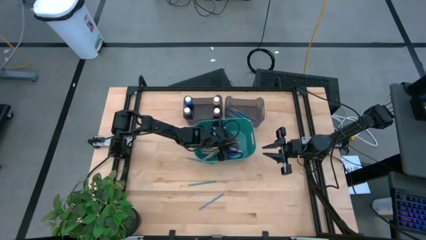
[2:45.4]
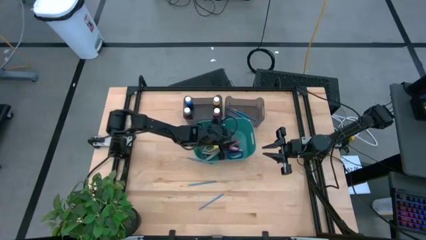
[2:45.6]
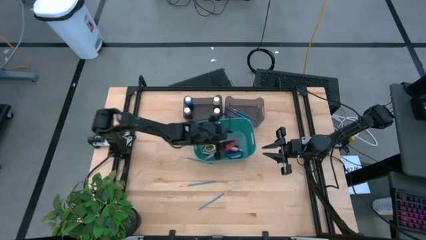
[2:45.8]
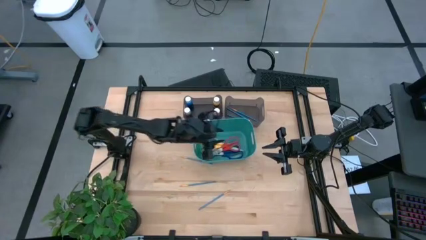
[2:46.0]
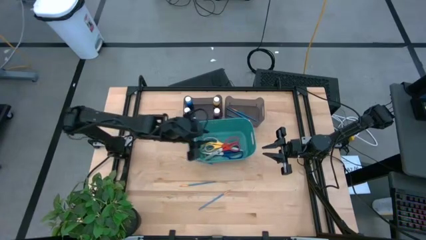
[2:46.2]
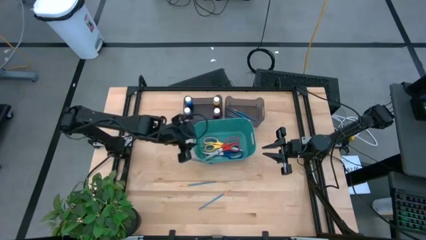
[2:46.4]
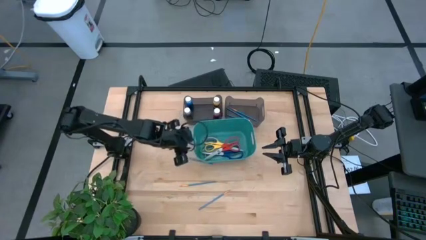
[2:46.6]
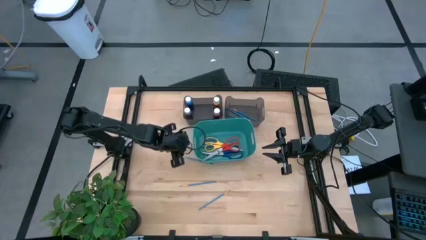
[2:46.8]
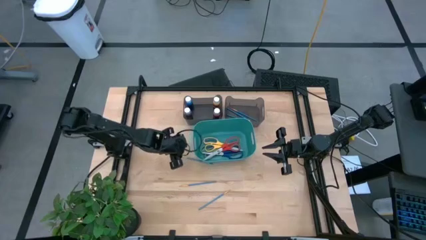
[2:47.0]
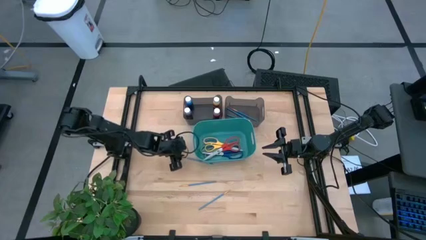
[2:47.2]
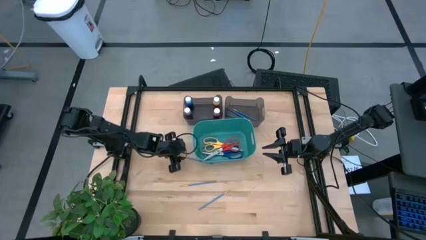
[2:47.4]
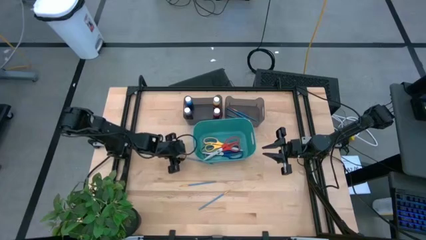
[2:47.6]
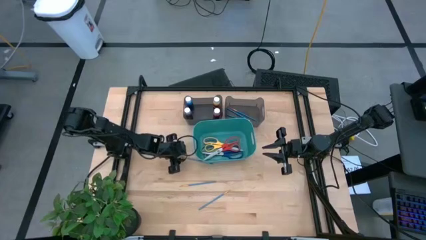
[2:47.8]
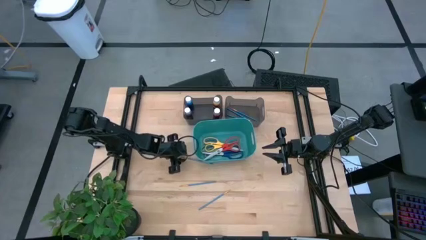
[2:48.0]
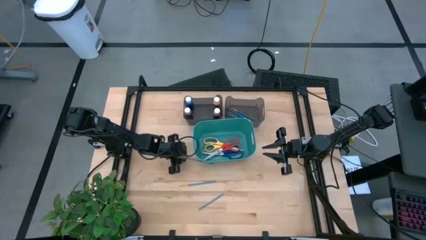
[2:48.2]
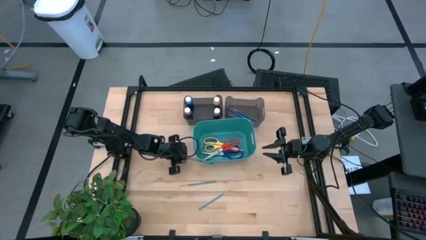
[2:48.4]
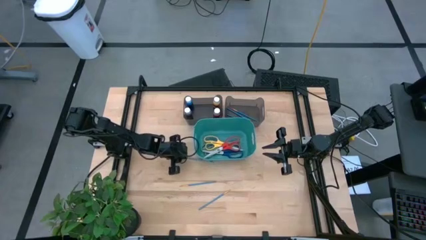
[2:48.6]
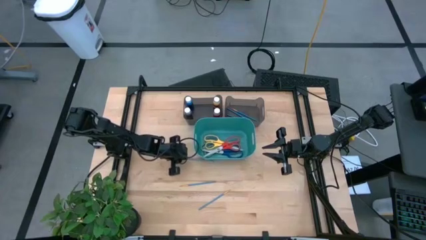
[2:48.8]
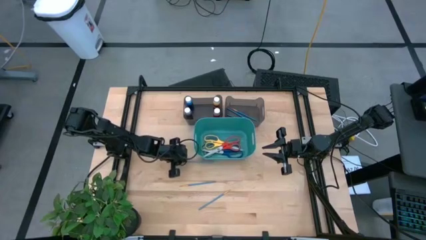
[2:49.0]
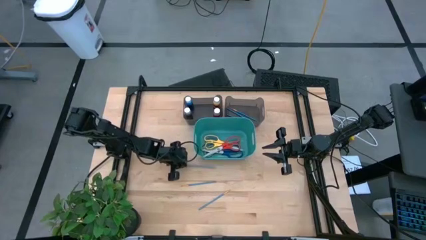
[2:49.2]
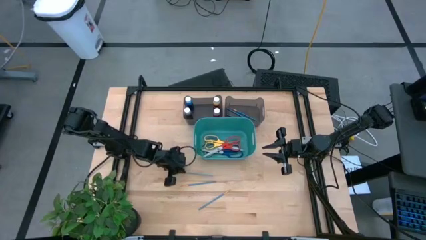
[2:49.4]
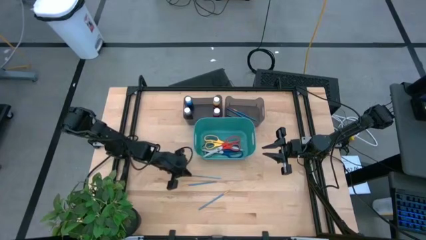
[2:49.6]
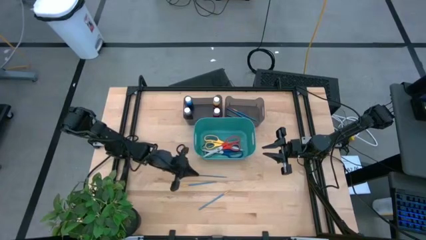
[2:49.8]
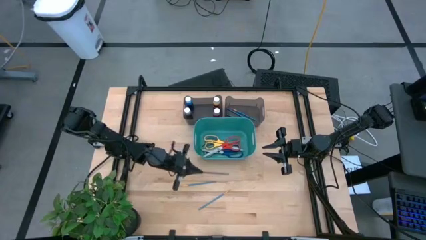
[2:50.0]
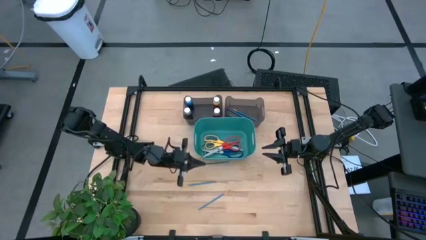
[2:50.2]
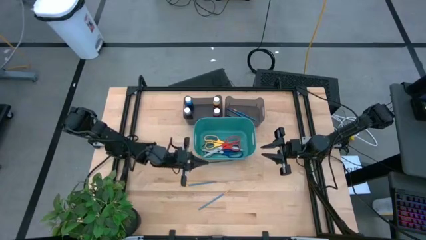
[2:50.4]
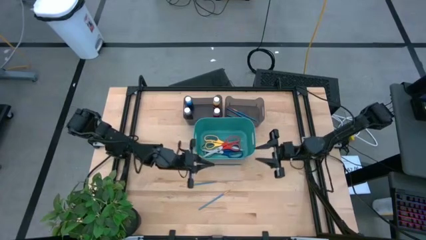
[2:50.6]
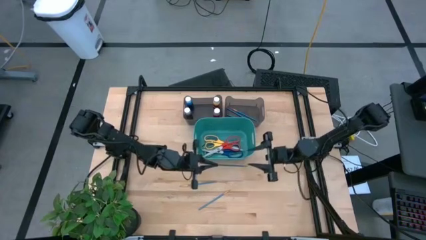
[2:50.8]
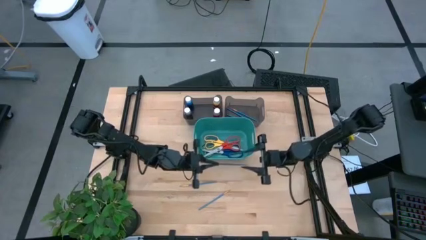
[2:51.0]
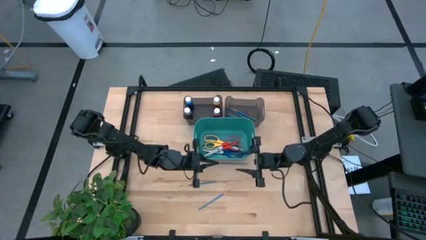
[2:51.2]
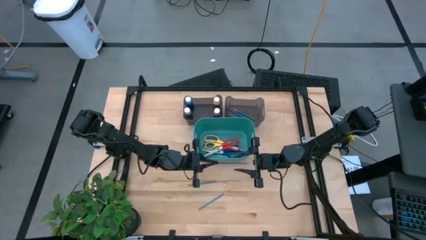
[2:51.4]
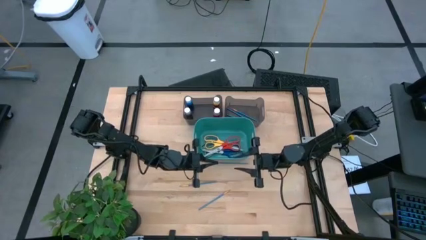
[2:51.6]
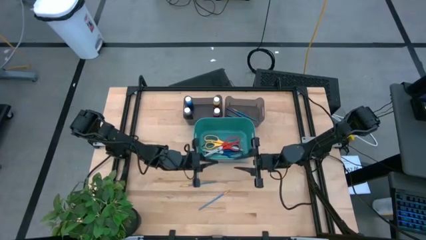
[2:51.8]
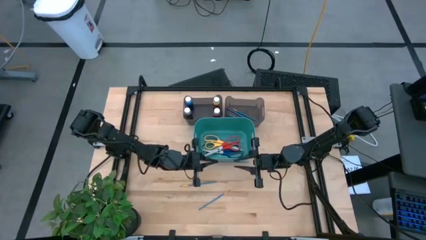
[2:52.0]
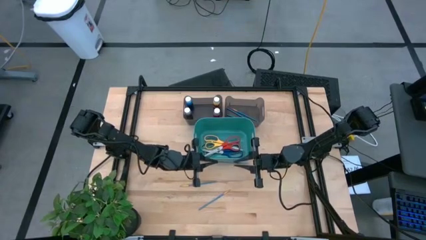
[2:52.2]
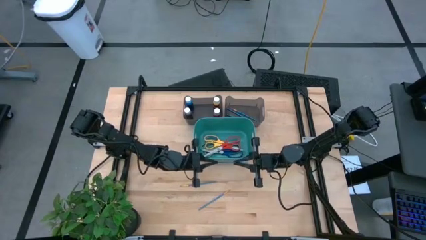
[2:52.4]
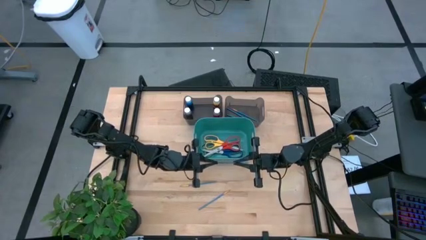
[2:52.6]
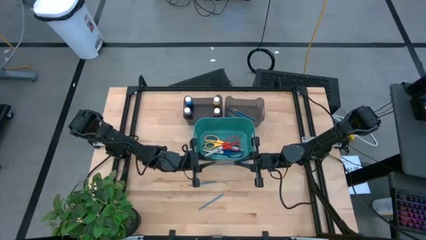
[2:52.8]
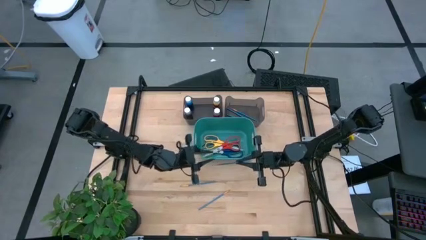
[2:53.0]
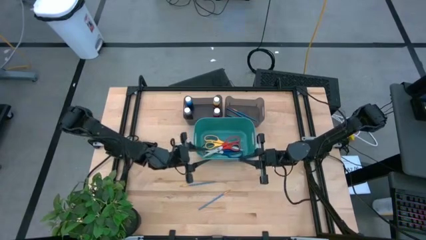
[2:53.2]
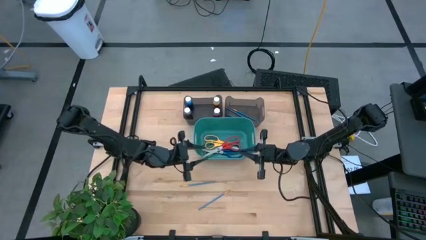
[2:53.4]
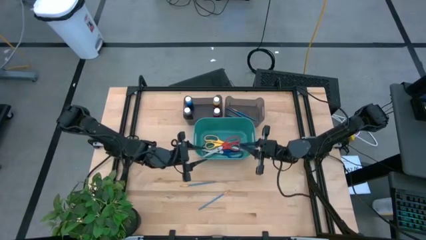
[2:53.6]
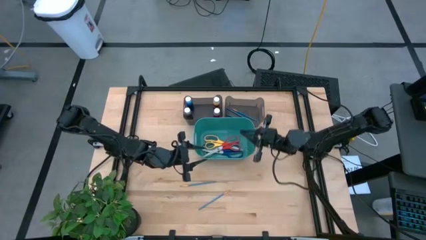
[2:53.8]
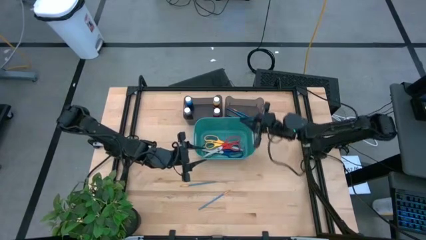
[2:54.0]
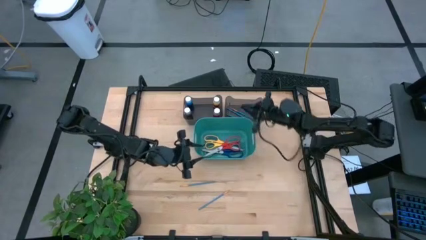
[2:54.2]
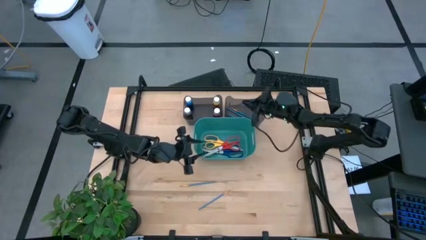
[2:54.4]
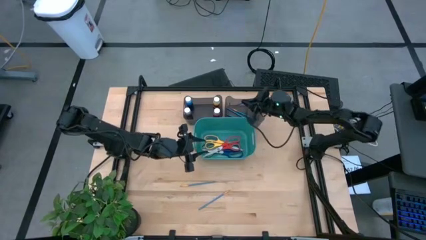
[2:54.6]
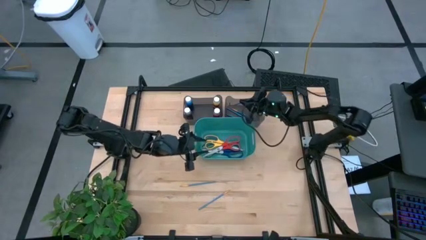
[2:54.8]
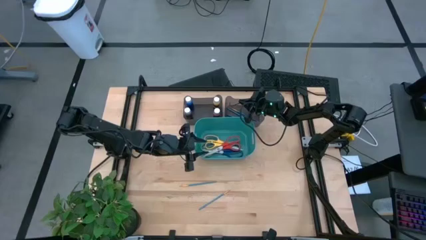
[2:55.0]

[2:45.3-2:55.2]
Task: Pick & Place Paint Supplies
Put the blue paint brush into the right black bin

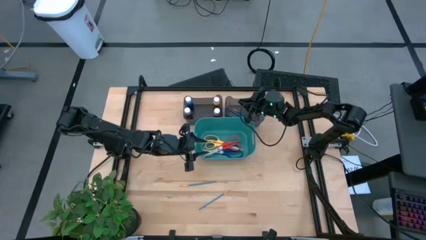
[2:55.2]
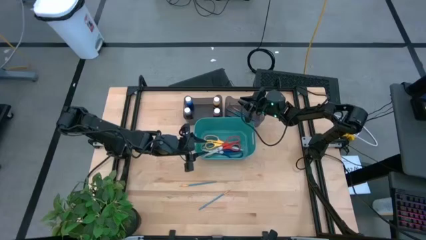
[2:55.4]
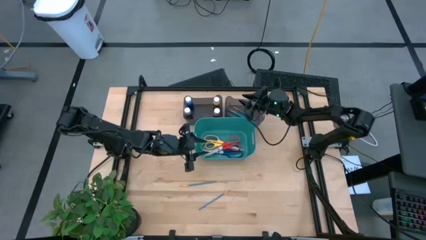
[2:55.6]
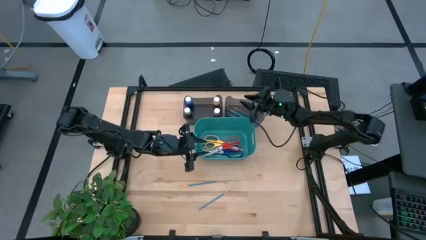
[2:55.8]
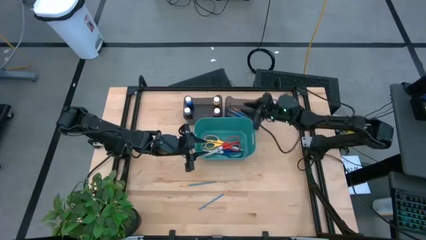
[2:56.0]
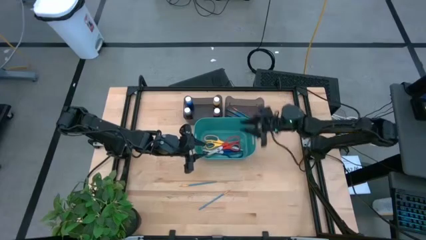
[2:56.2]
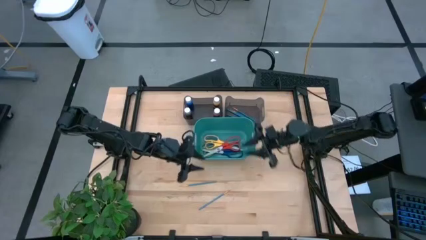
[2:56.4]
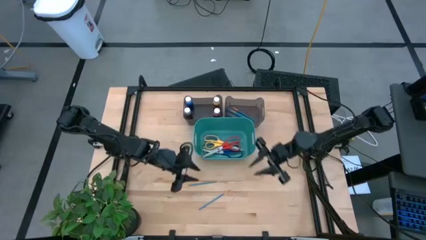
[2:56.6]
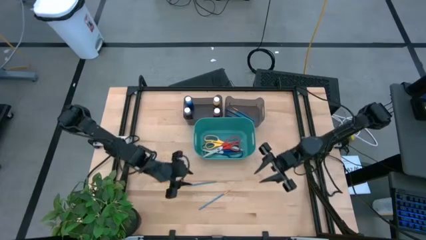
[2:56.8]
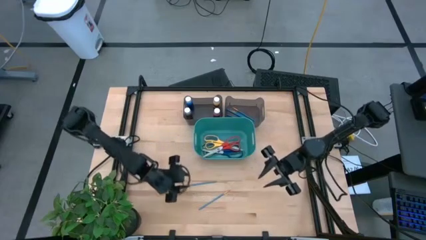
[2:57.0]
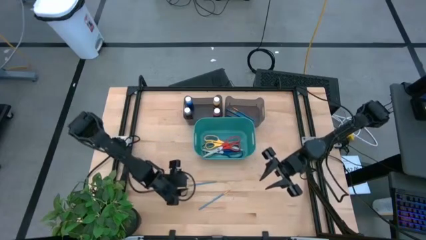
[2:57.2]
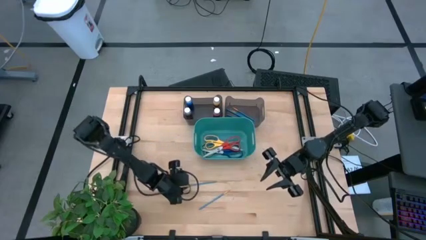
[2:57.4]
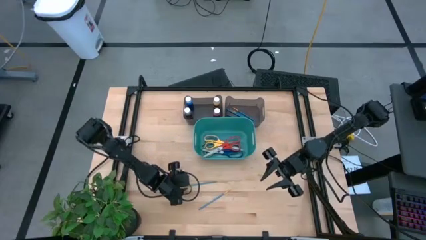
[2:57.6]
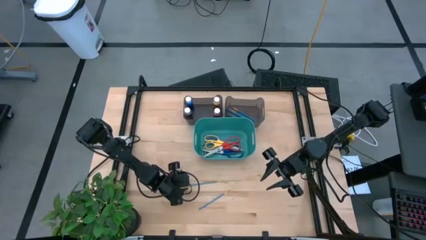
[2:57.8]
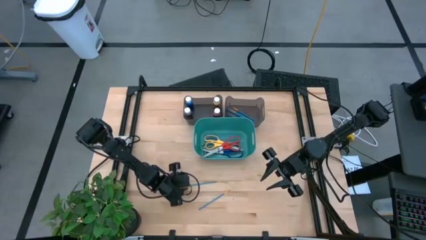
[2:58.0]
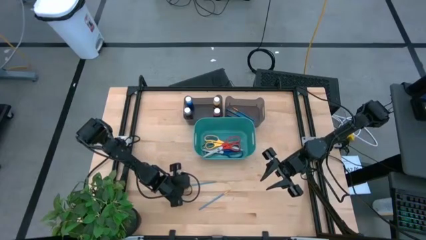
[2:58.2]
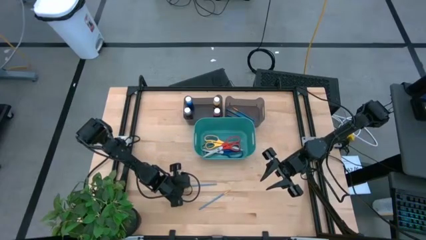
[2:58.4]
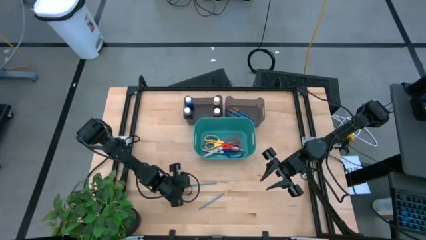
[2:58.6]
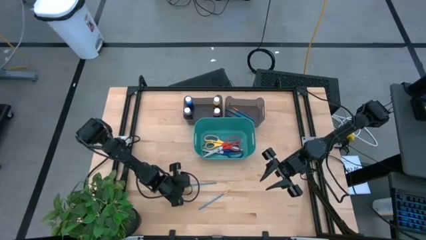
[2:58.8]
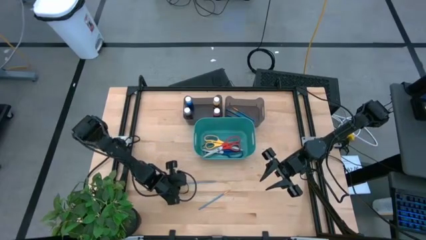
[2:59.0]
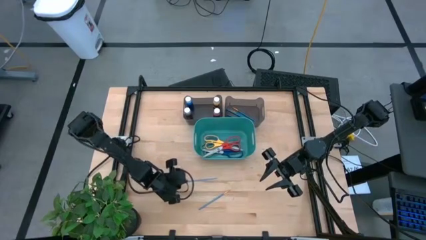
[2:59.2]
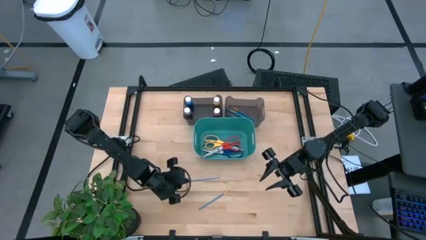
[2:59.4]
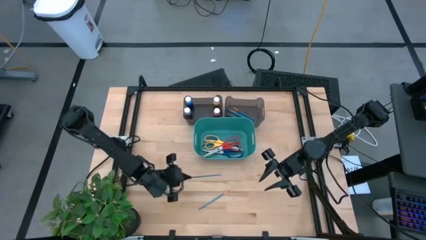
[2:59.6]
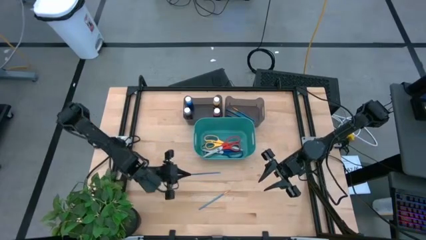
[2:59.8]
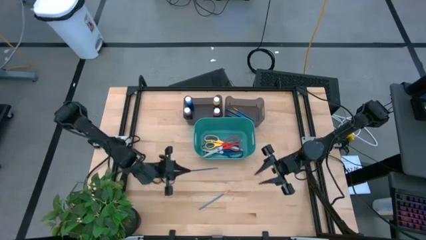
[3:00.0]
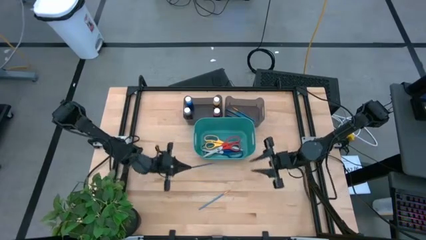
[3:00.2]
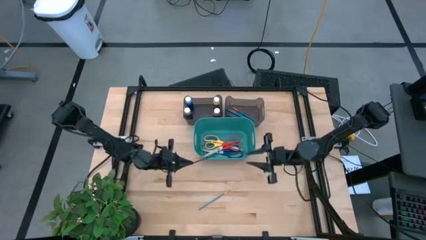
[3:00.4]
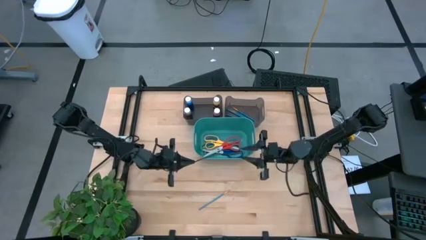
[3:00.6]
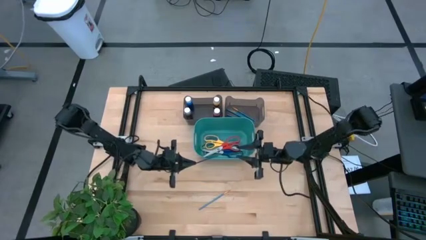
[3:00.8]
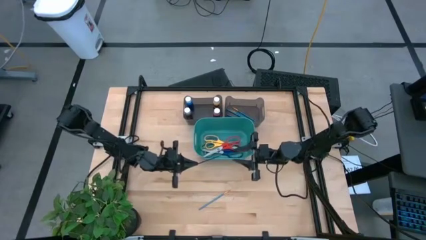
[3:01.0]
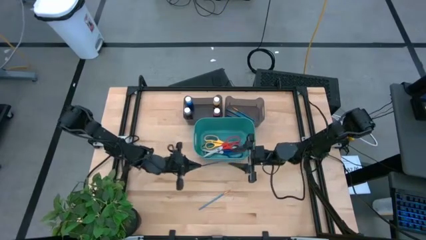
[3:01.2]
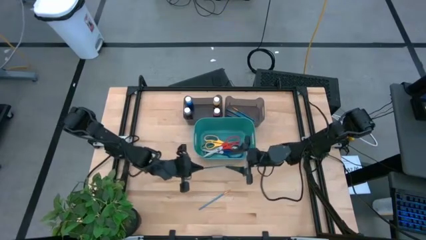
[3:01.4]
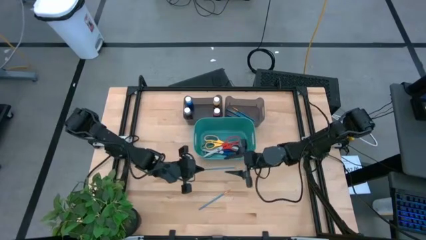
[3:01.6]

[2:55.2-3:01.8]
Put the blue paint brush into the right black bin
